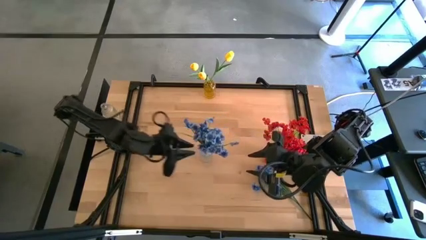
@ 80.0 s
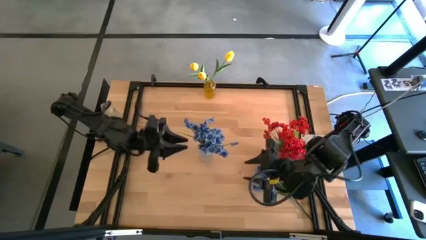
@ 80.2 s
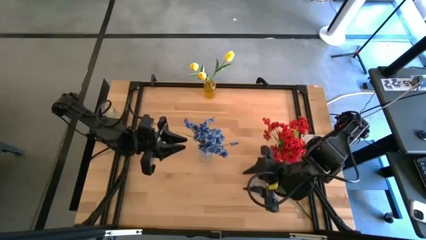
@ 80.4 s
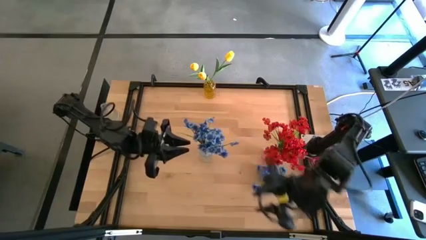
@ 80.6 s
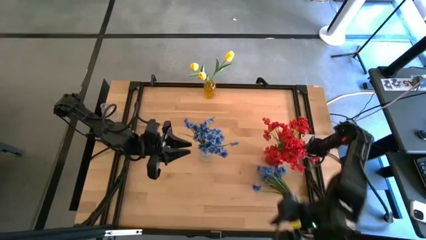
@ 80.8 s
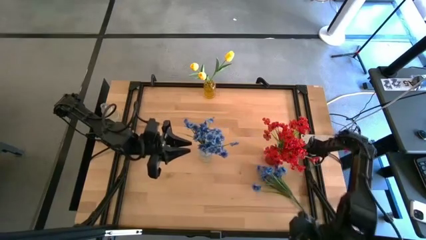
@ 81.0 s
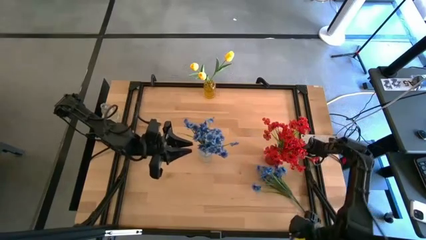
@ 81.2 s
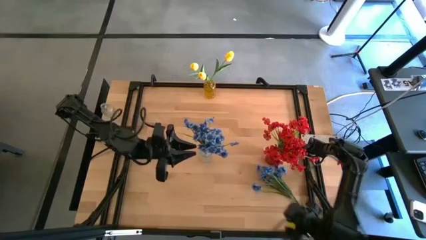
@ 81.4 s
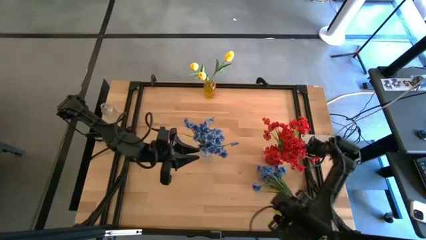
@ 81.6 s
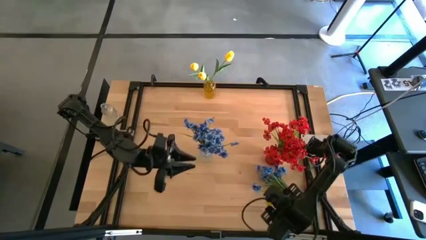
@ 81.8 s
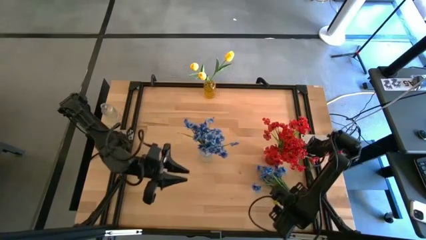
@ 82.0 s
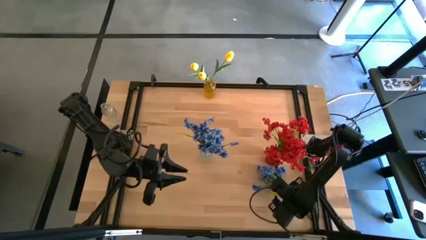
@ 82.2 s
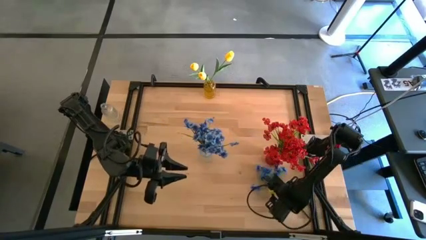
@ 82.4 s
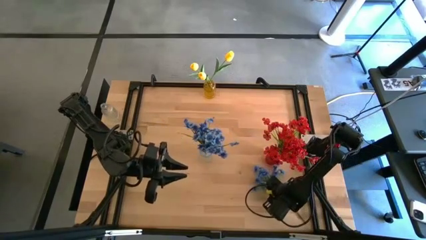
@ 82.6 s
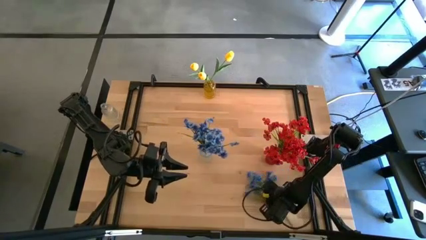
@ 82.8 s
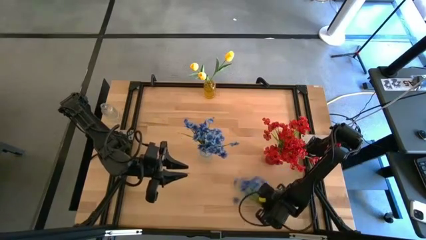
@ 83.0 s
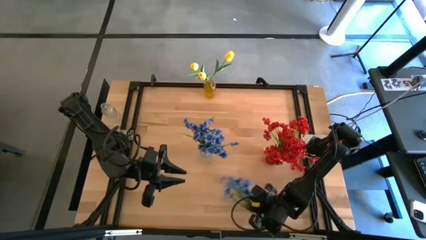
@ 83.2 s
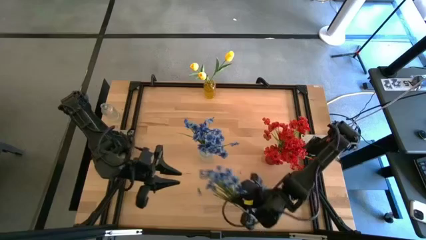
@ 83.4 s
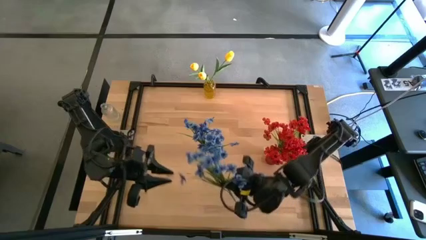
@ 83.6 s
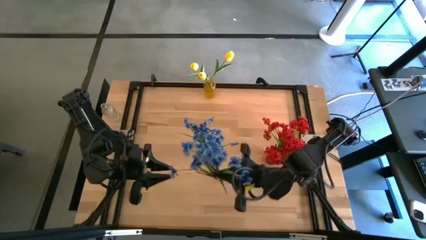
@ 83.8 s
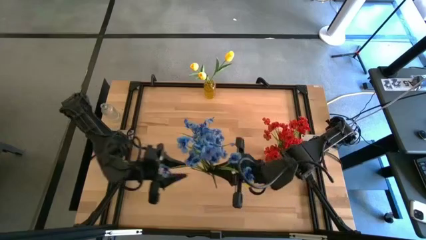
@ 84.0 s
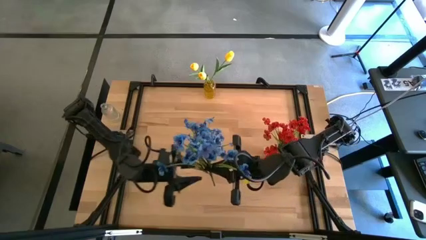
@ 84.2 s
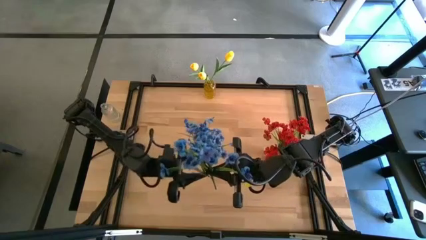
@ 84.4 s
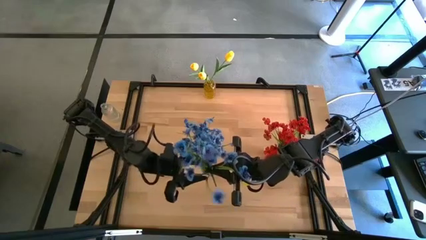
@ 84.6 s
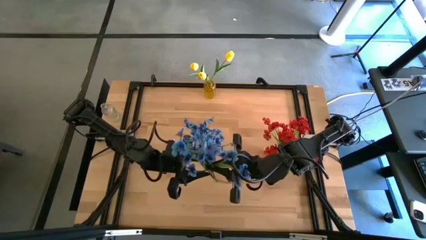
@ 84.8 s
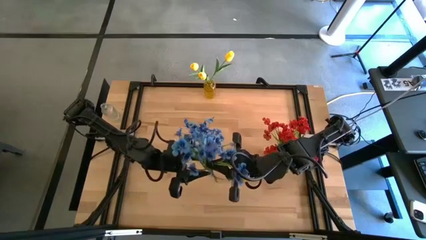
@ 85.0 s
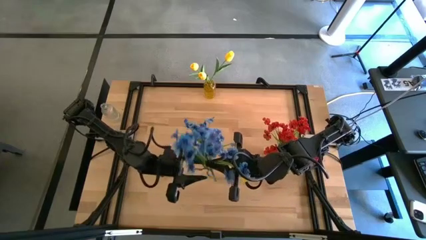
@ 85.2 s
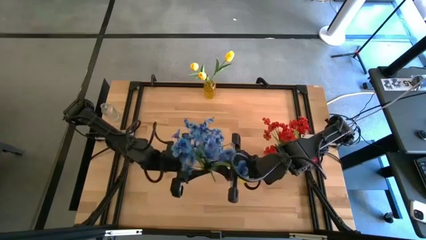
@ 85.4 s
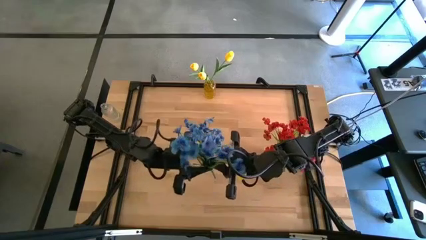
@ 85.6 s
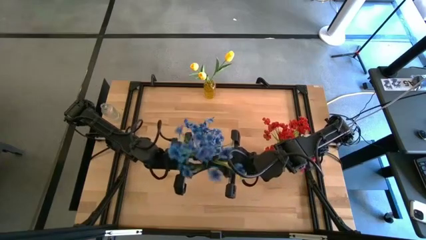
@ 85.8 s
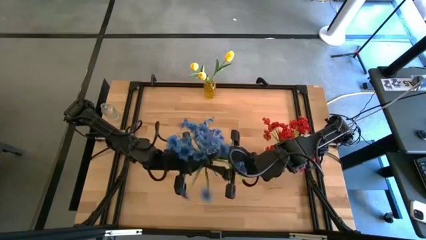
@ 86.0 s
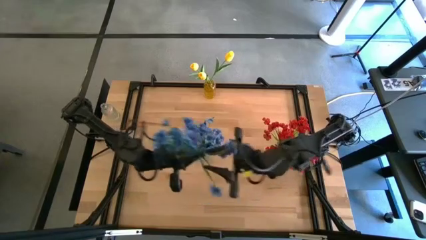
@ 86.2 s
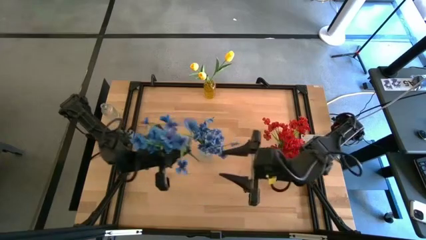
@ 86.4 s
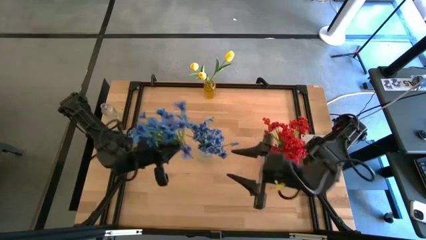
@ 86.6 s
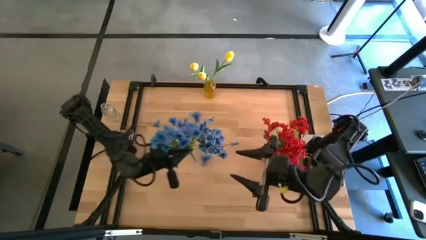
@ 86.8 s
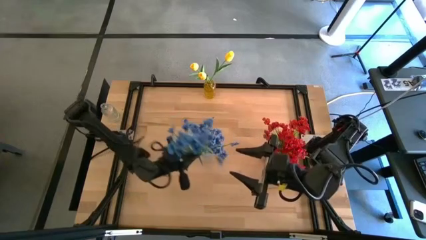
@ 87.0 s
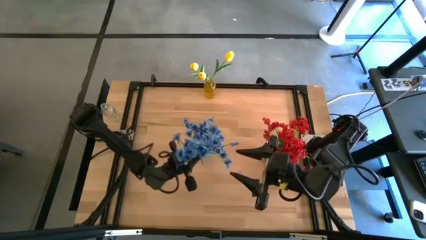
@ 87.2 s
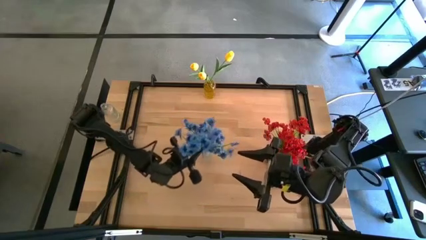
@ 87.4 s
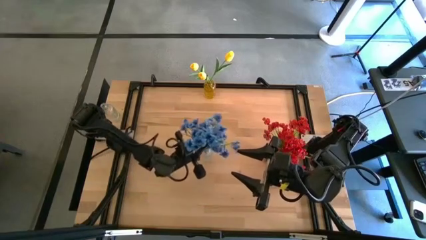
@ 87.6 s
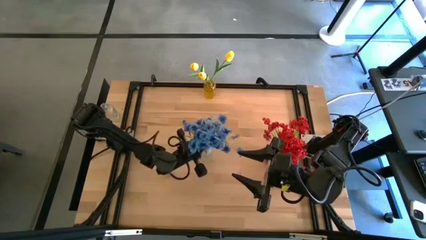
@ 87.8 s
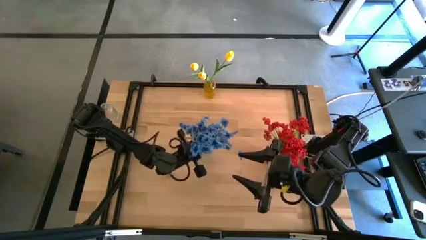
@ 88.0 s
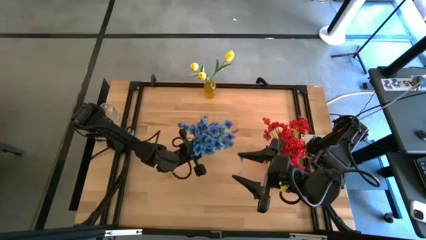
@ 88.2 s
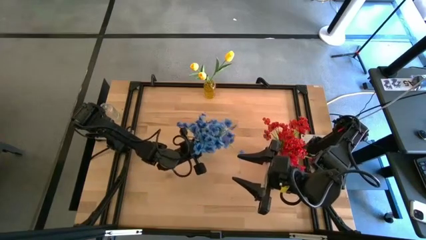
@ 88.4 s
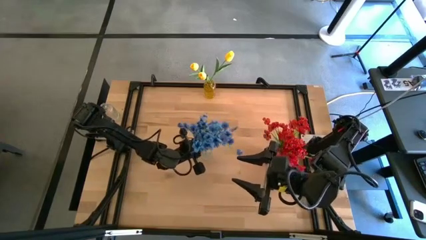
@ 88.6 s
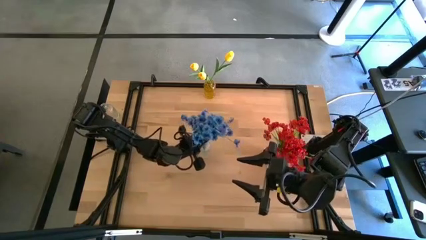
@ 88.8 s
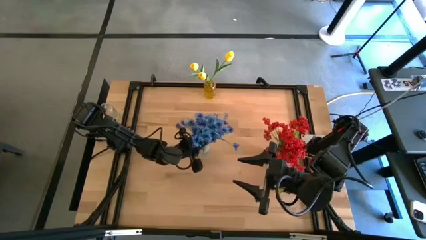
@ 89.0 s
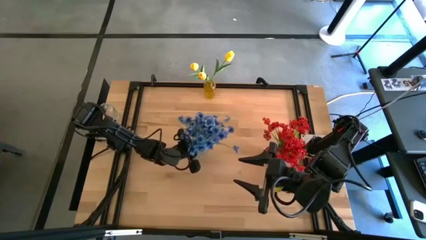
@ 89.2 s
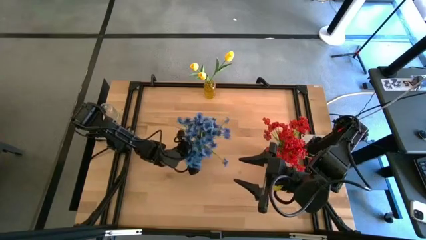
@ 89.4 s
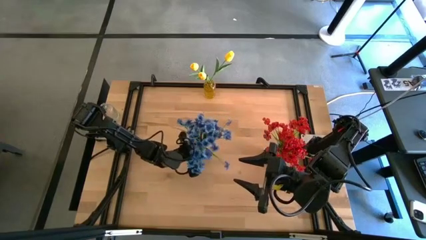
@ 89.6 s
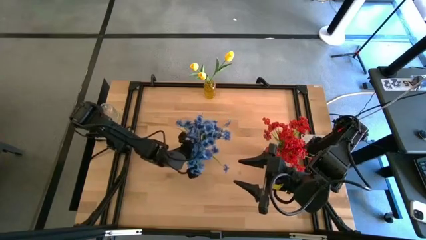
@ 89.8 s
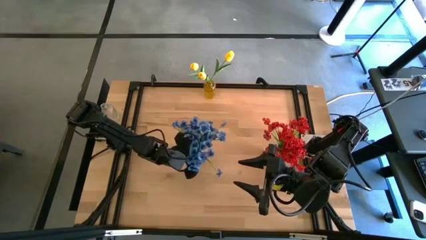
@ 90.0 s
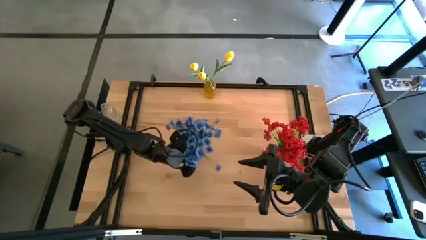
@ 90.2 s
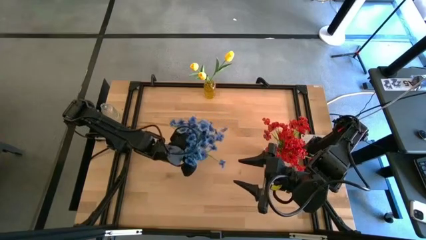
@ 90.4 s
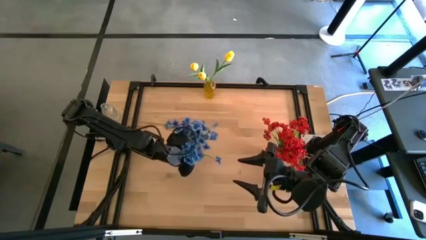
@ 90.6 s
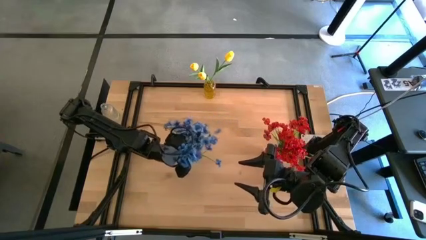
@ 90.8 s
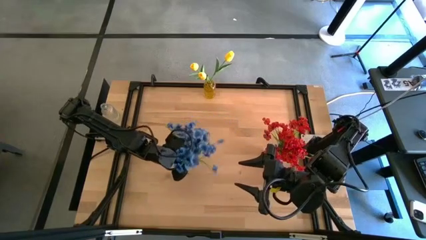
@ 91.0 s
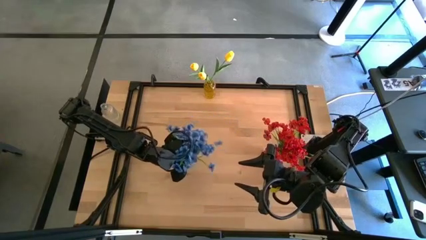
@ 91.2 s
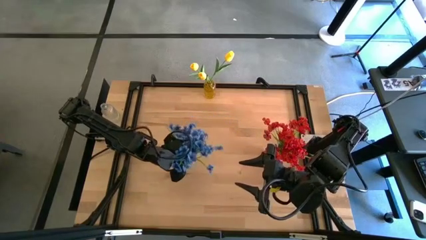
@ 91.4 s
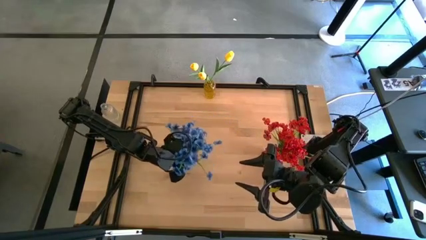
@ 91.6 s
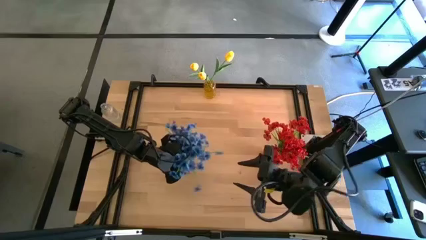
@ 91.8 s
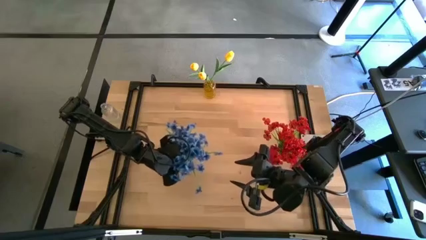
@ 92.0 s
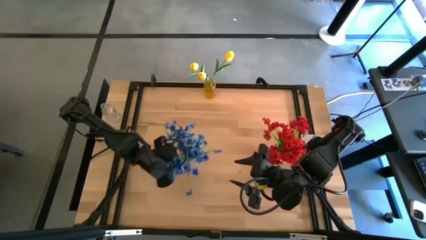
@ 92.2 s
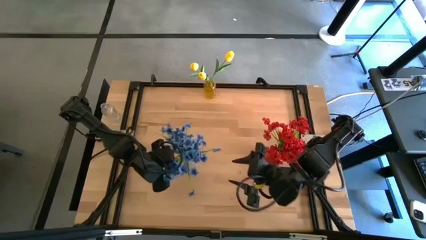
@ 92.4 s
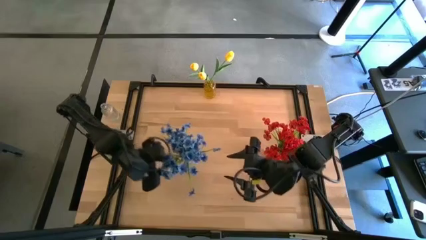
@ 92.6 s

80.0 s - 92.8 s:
Task: Sort flowers into vase by color
Put the blue flower into the transparent vase

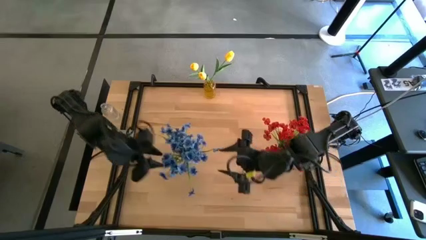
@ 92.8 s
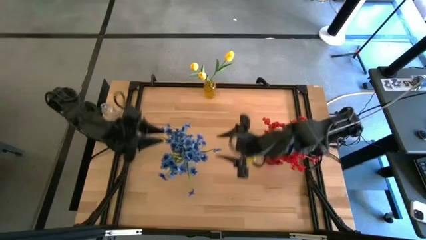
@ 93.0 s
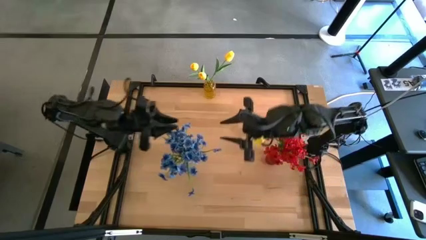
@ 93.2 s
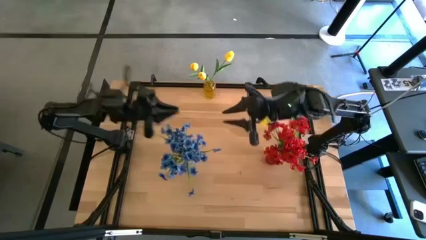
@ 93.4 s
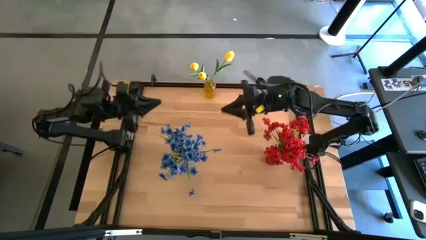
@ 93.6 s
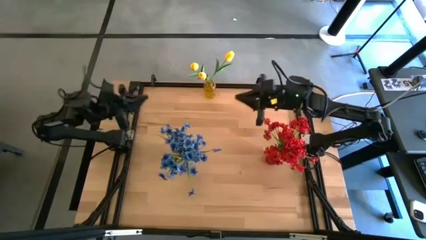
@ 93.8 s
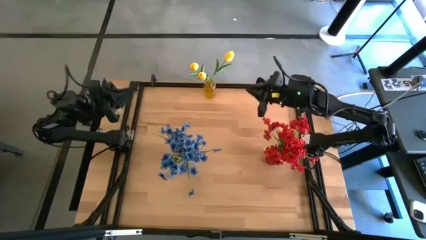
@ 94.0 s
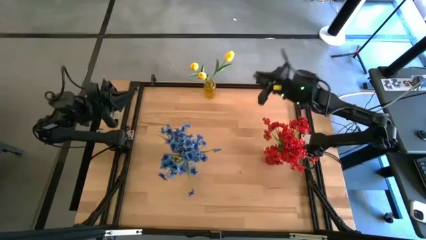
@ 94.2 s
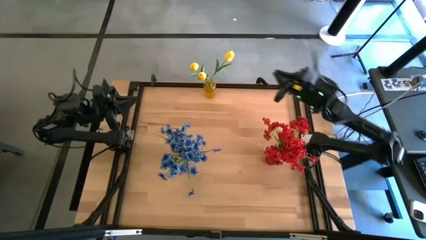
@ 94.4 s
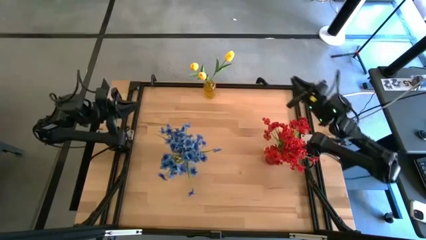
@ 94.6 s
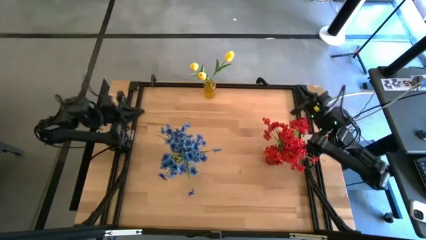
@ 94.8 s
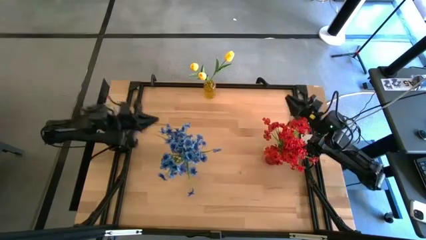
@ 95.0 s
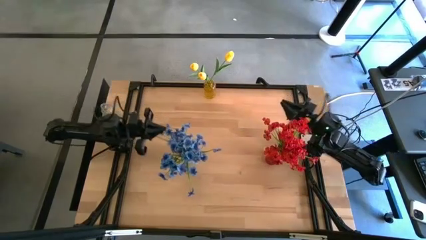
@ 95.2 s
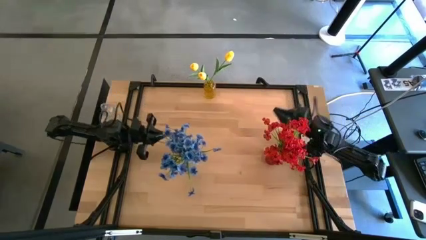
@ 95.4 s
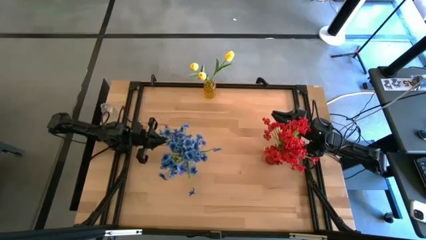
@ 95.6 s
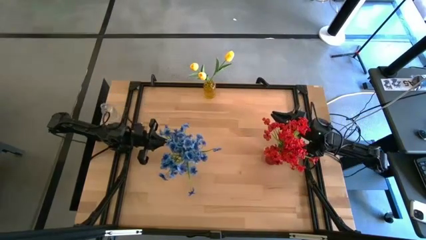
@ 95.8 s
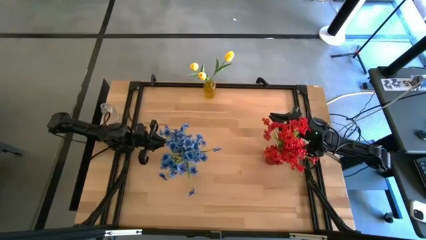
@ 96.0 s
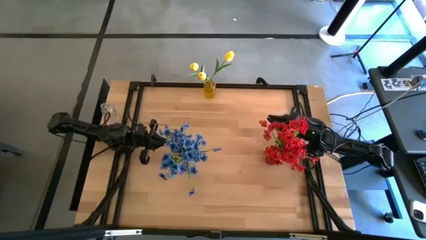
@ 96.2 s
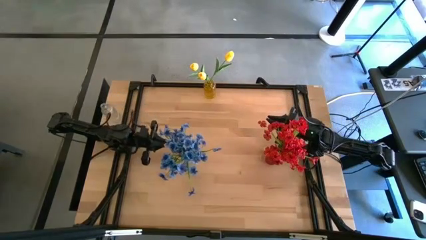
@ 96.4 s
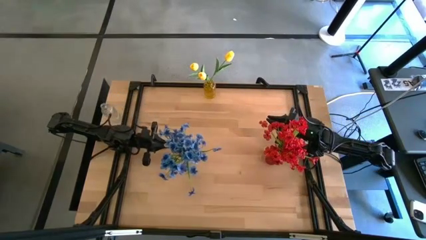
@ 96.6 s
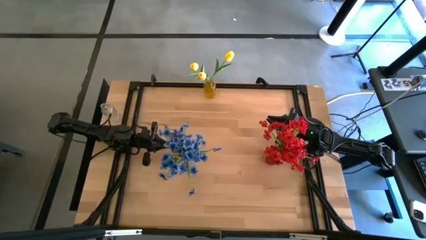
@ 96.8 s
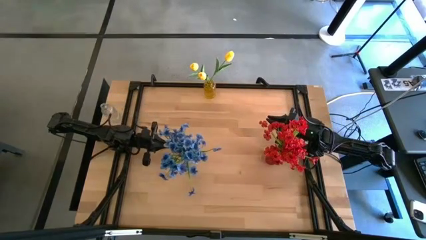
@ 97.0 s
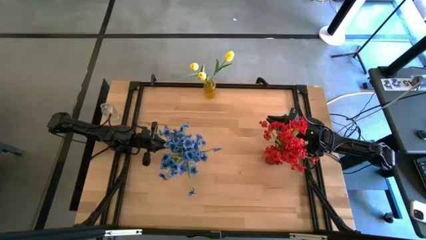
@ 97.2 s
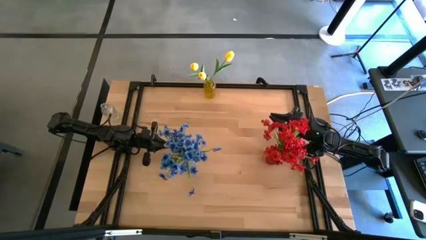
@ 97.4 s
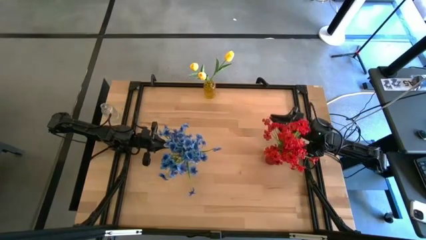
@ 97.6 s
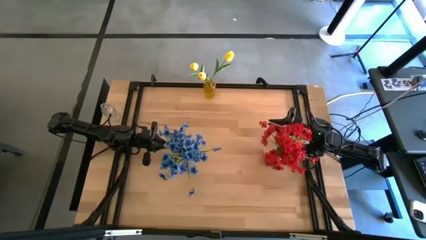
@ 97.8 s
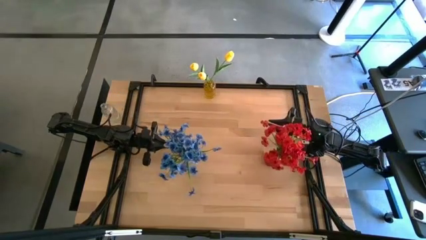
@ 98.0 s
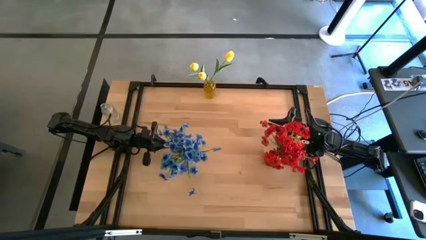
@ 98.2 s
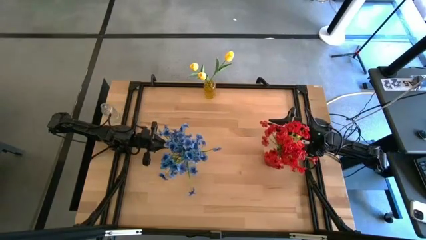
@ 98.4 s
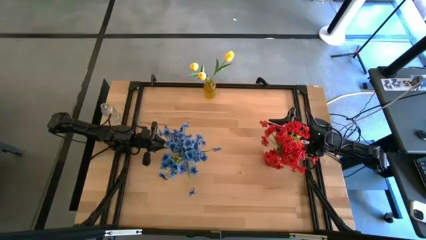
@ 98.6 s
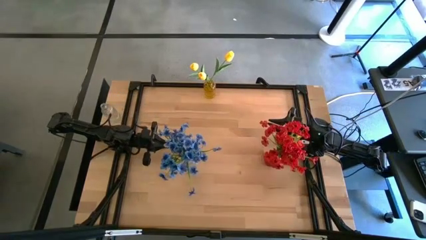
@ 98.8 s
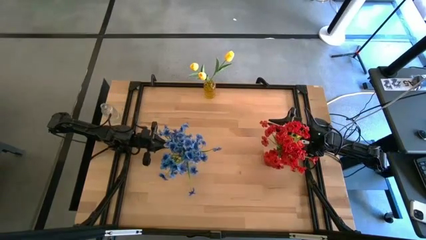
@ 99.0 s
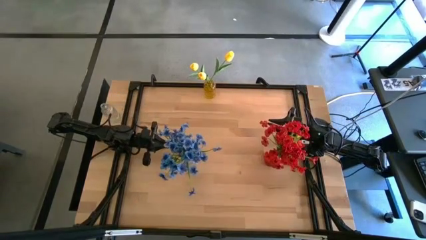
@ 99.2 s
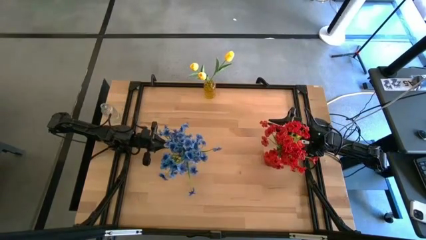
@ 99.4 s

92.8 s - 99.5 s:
Return to Home Position
